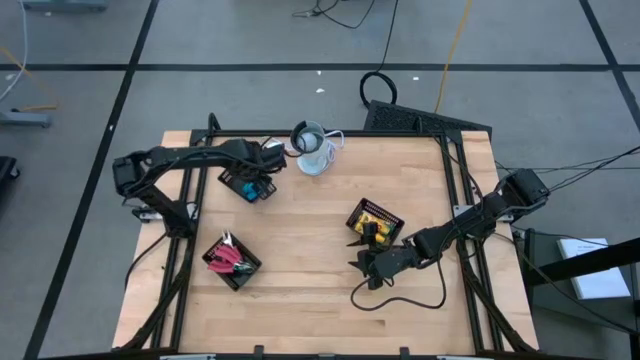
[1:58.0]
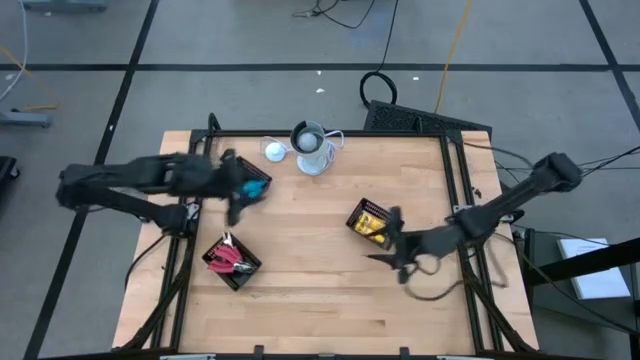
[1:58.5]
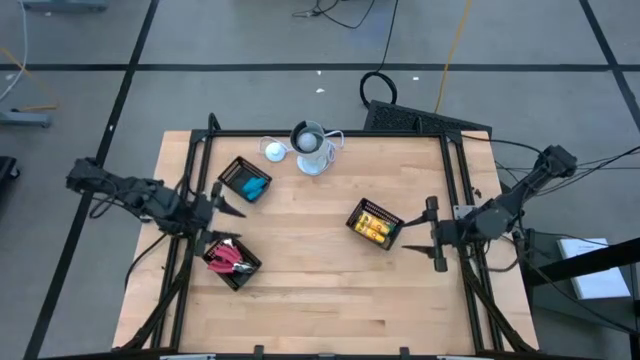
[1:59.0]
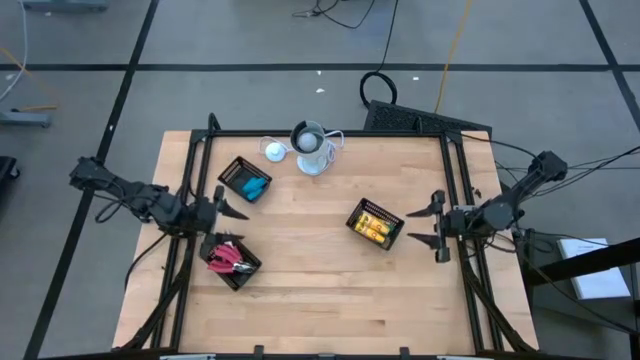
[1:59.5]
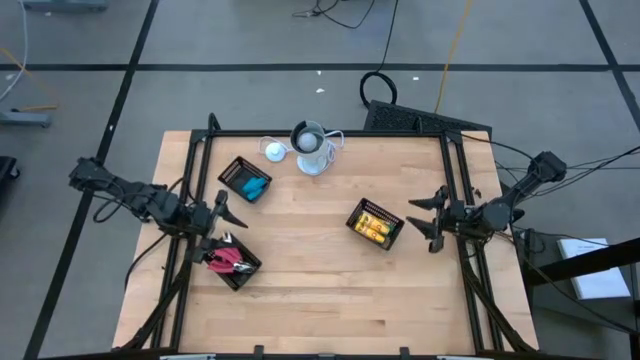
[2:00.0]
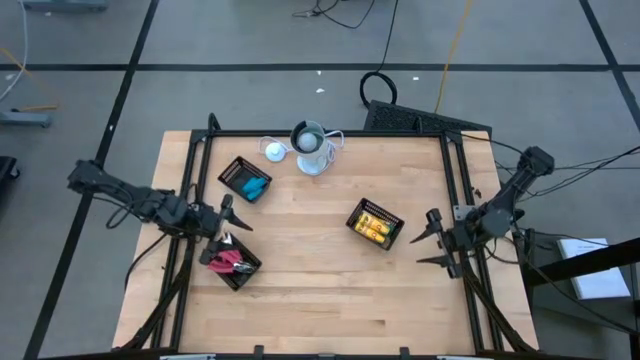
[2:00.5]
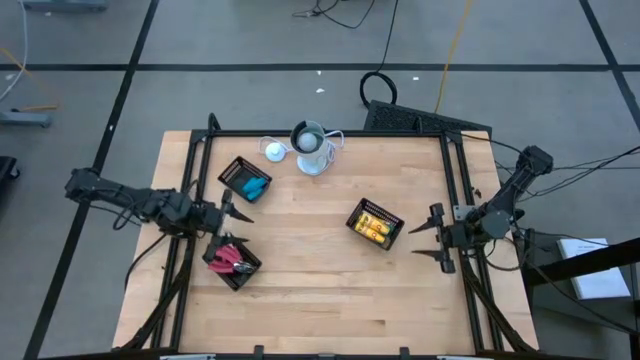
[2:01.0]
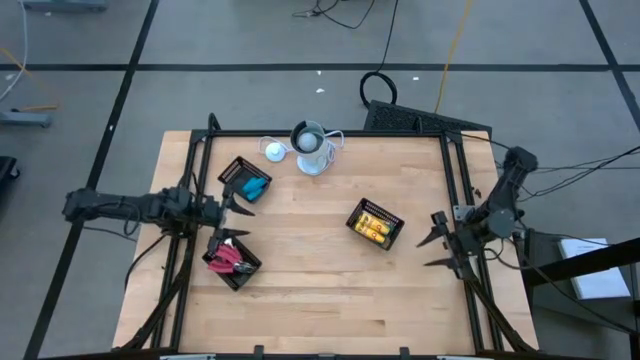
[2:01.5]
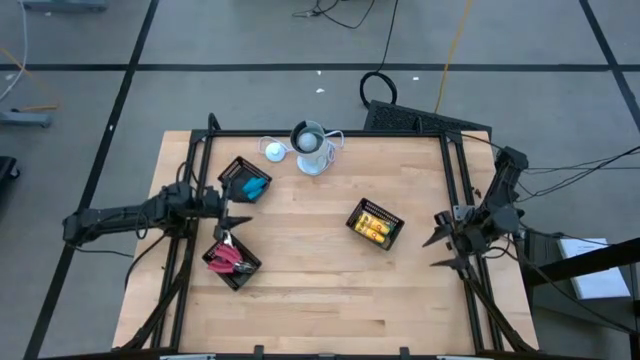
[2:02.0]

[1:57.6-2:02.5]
Task: Pick & Place School Supplies
Return to Home Position

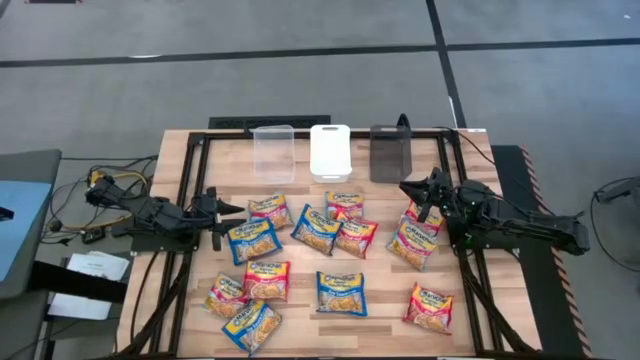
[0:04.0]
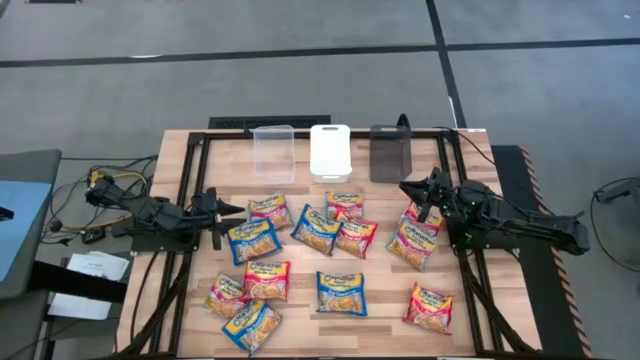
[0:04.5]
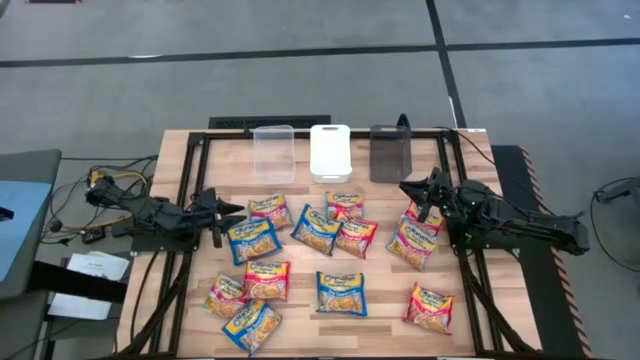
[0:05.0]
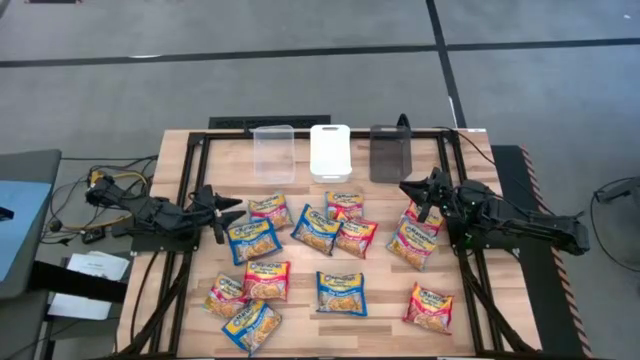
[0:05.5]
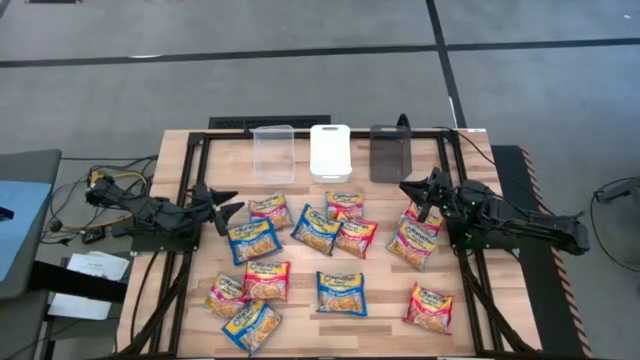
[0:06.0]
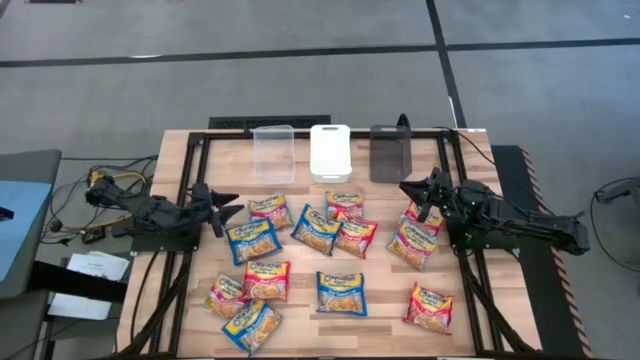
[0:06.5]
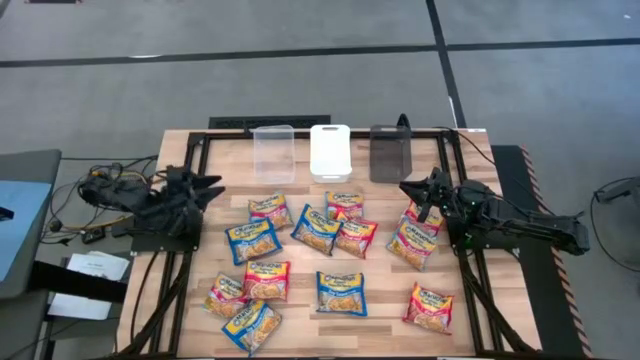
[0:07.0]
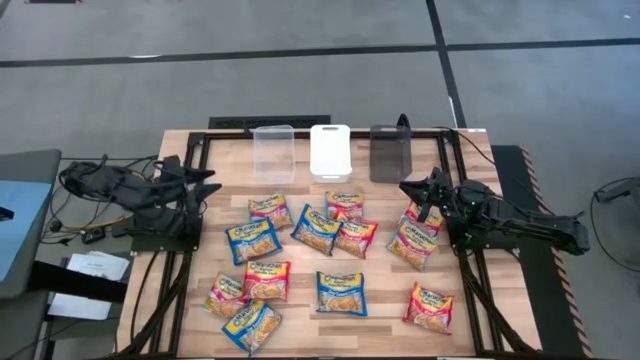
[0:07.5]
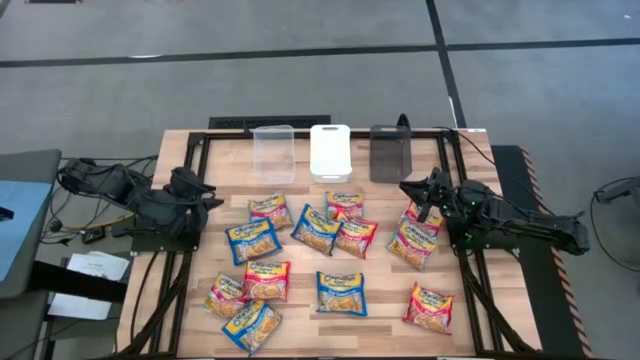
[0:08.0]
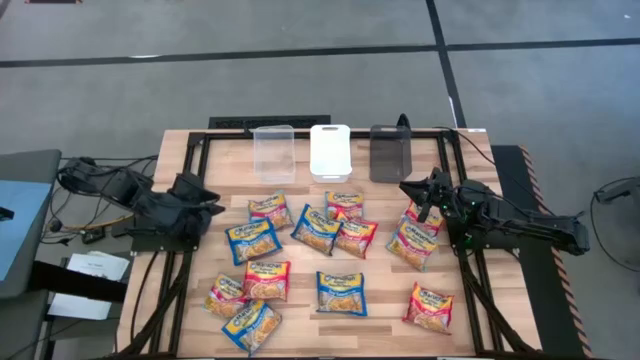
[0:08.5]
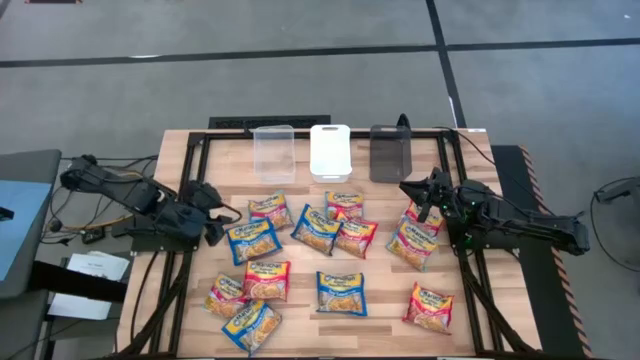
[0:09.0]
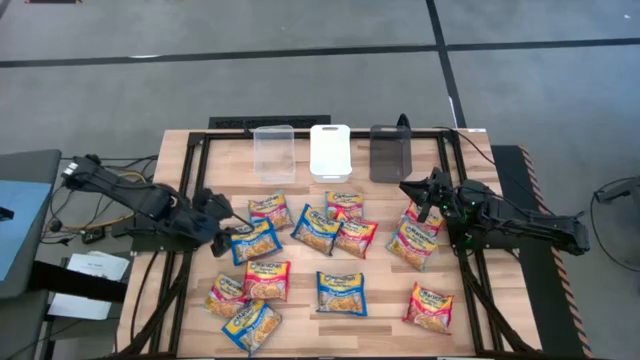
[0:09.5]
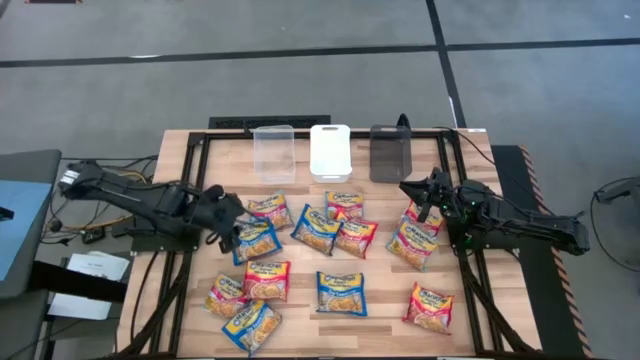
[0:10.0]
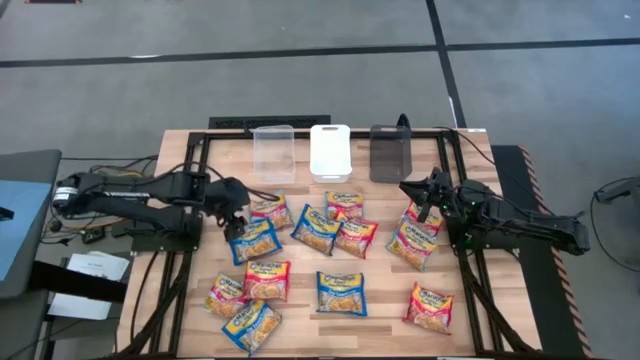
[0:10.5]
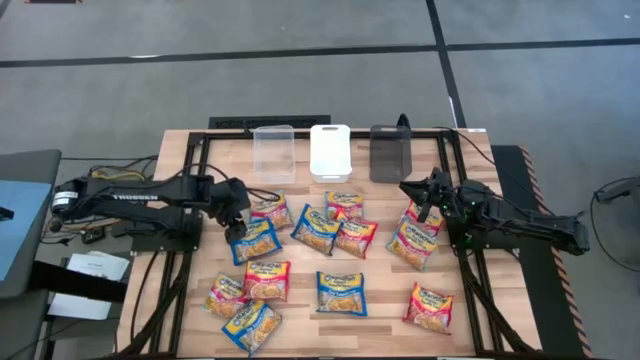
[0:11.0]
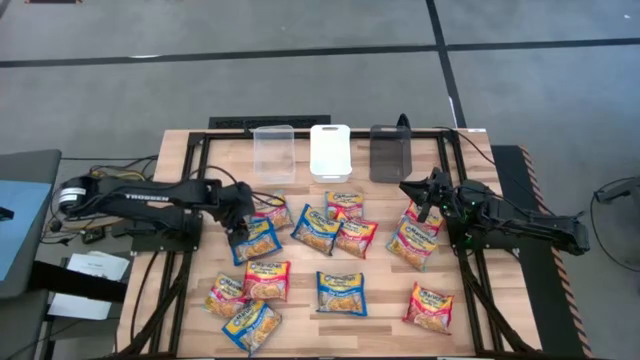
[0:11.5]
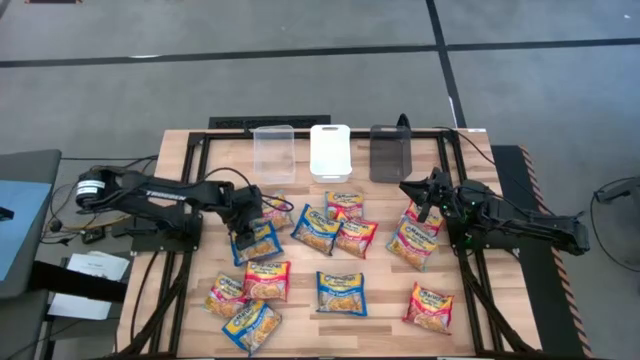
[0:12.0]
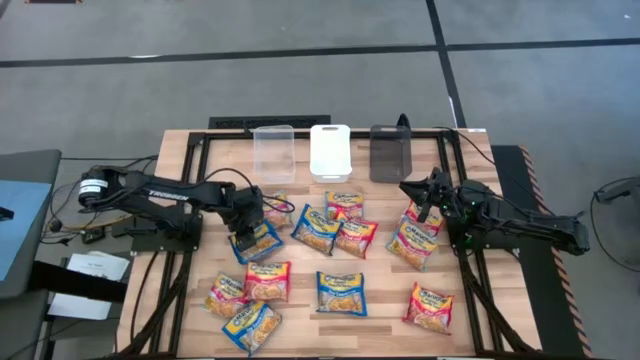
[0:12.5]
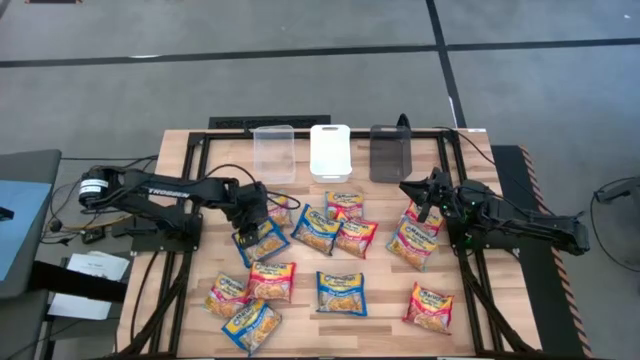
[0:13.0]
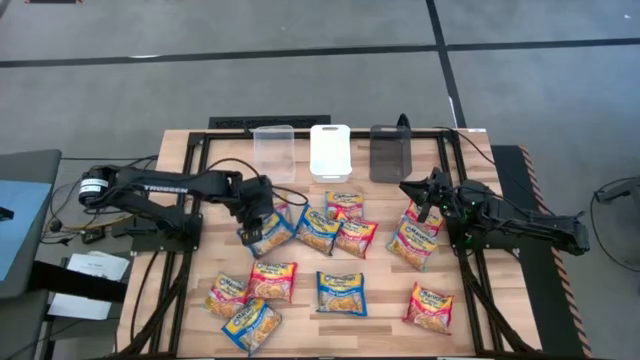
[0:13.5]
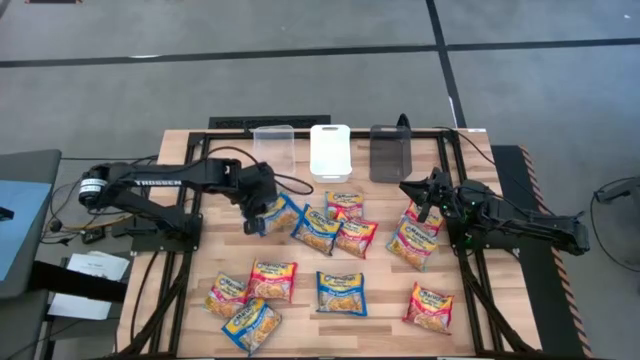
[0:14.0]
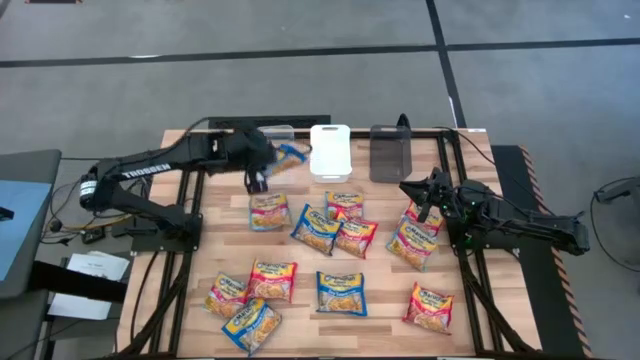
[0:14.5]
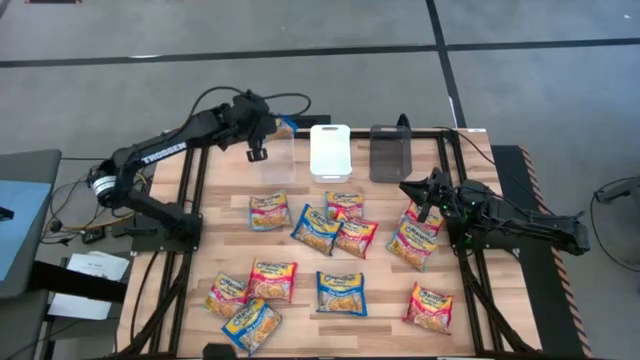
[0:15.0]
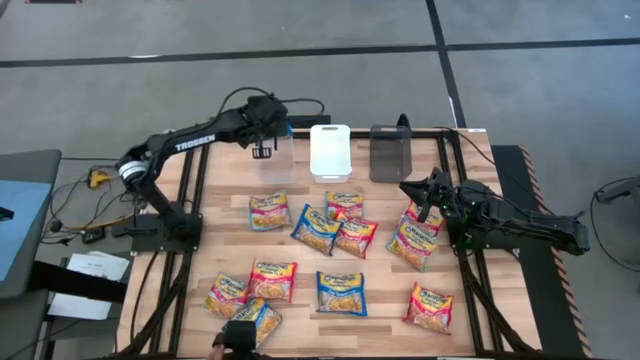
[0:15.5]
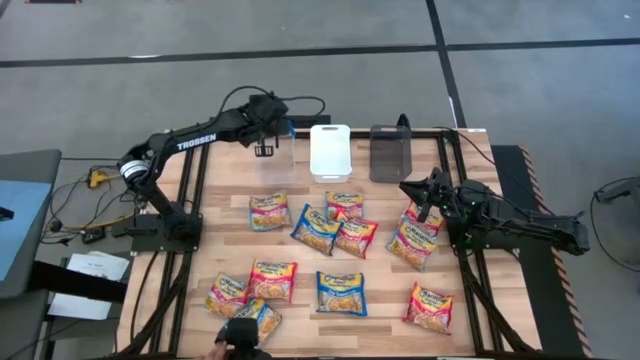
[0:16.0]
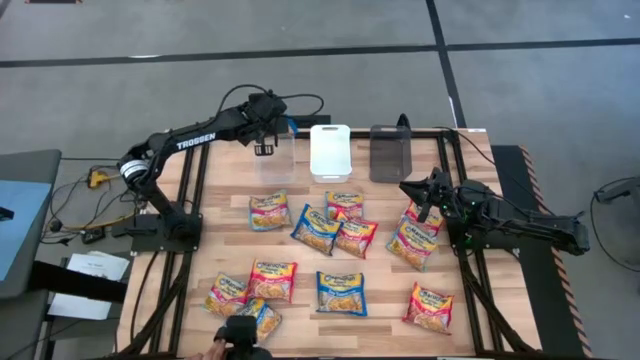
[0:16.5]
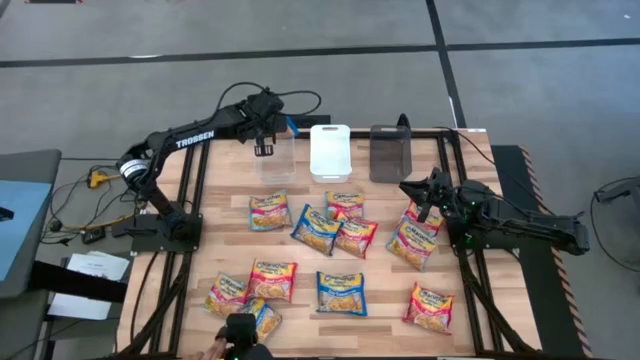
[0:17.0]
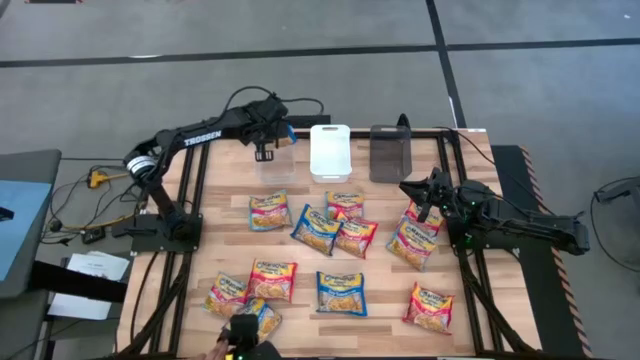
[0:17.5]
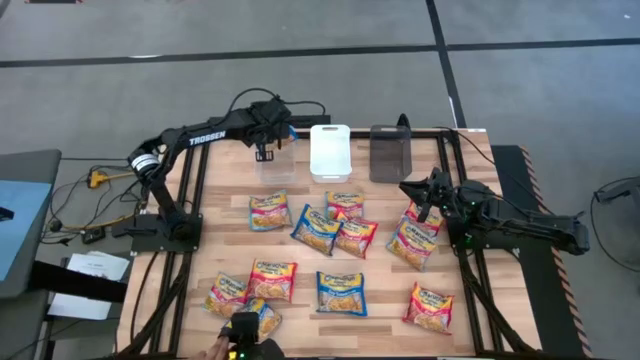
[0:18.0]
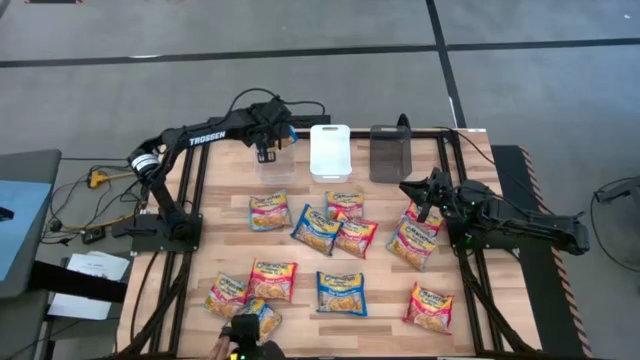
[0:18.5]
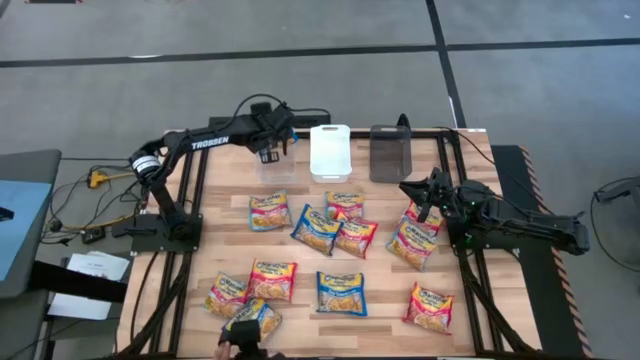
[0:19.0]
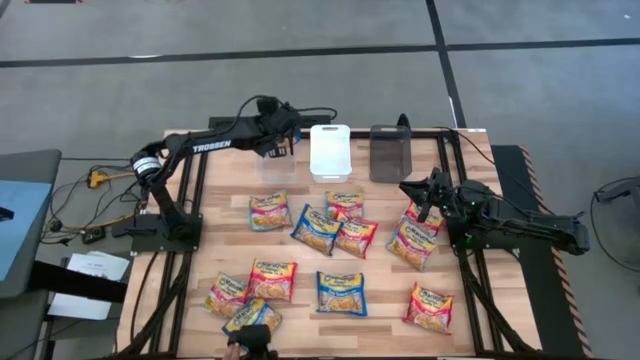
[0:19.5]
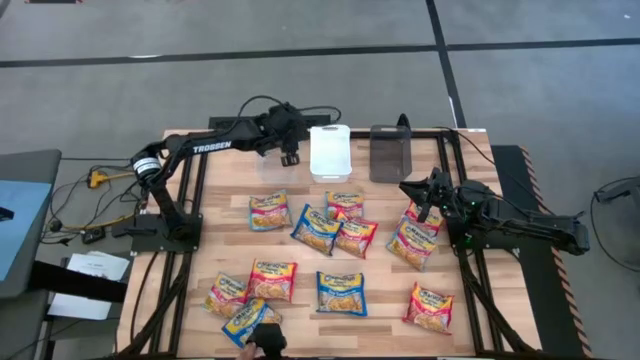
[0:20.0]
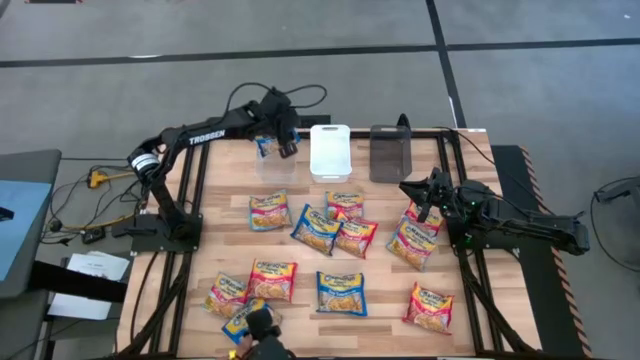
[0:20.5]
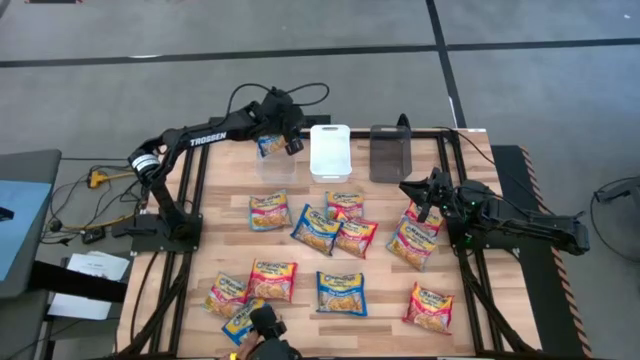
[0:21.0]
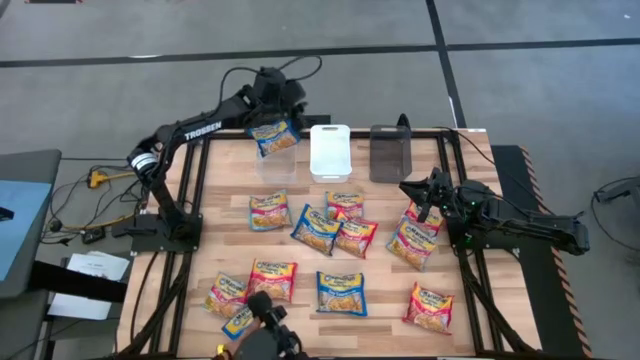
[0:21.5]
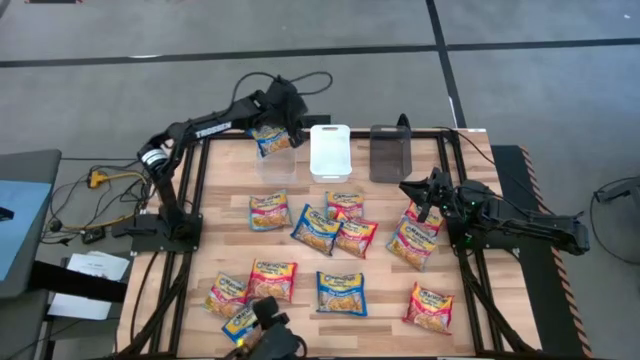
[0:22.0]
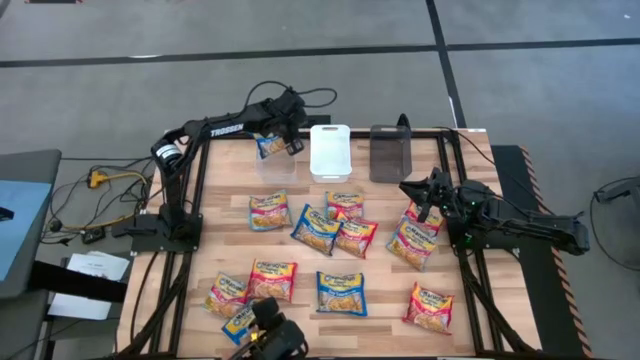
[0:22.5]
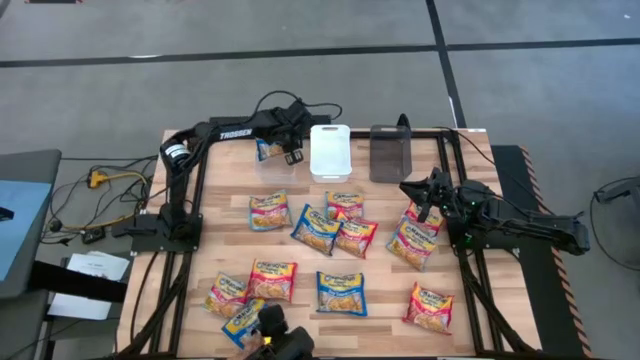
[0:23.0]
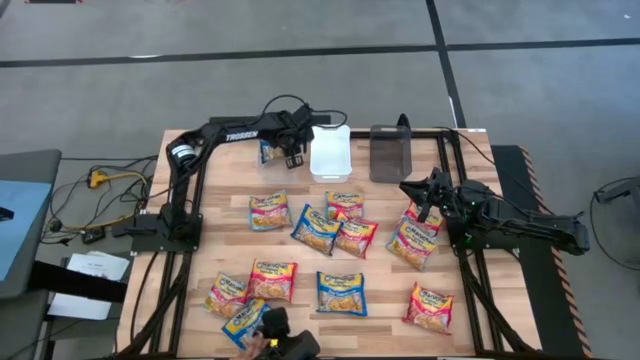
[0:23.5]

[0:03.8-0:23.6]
Task: Sort Maruchan noodles
Put the blue noodle pack into the transparent bin
